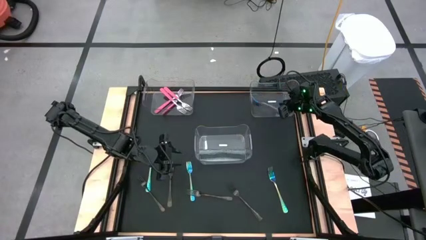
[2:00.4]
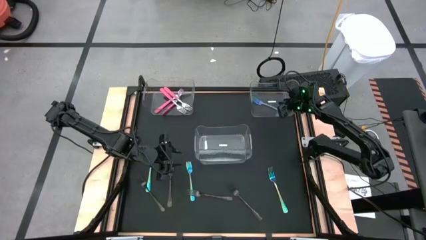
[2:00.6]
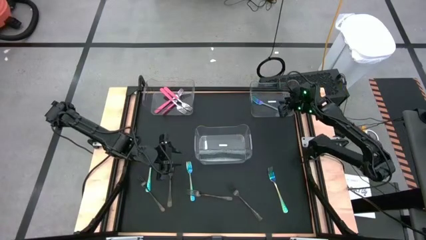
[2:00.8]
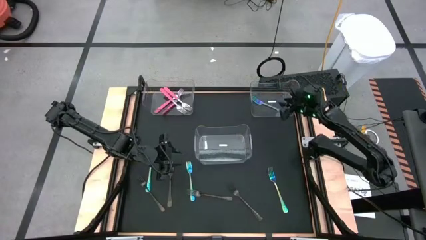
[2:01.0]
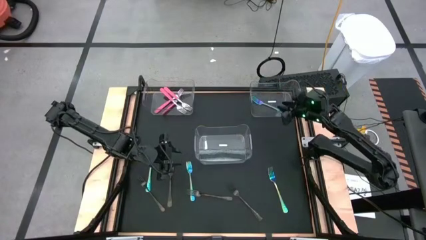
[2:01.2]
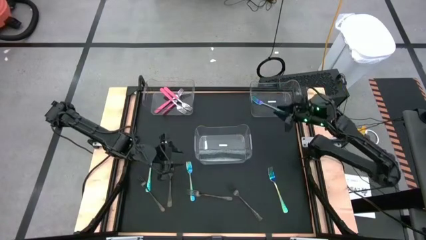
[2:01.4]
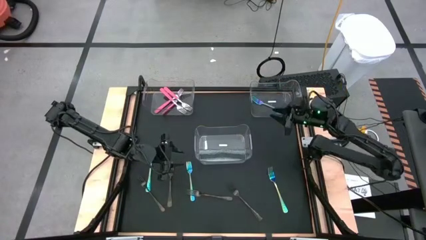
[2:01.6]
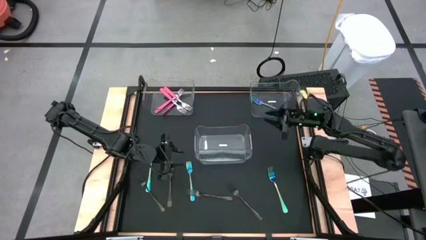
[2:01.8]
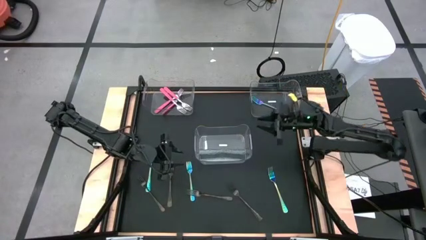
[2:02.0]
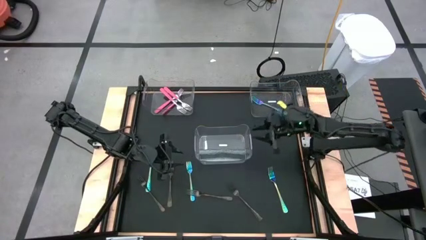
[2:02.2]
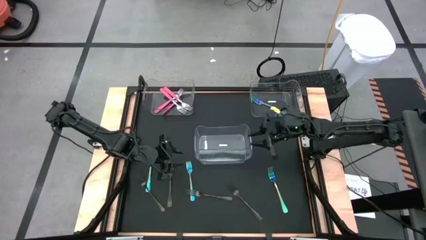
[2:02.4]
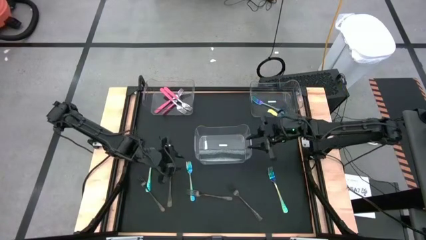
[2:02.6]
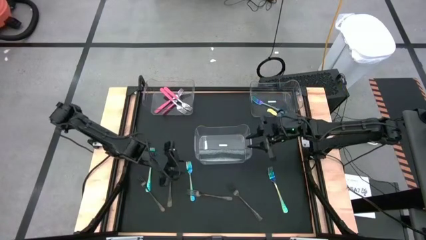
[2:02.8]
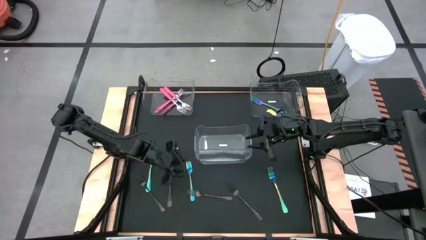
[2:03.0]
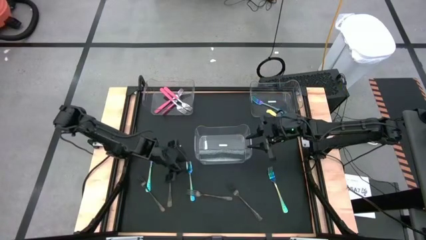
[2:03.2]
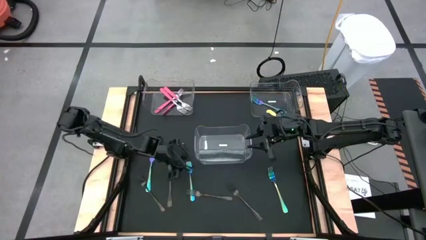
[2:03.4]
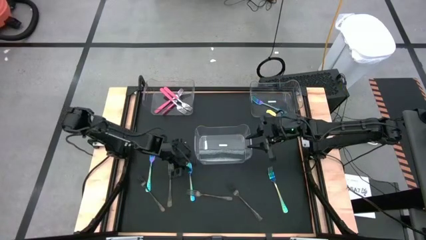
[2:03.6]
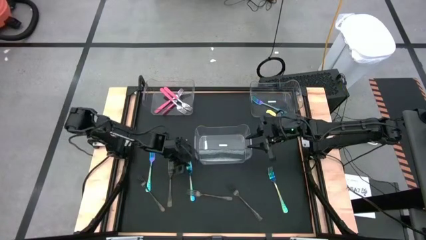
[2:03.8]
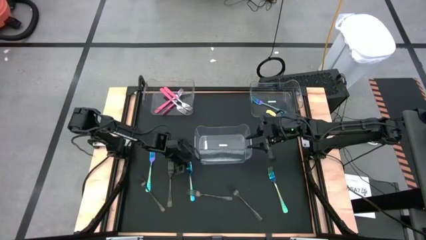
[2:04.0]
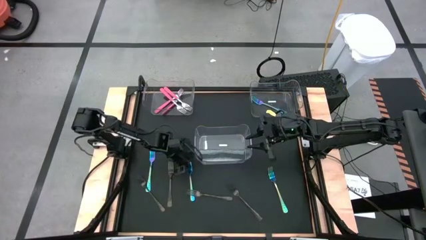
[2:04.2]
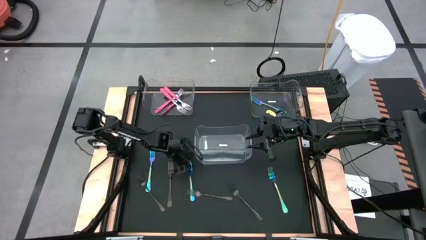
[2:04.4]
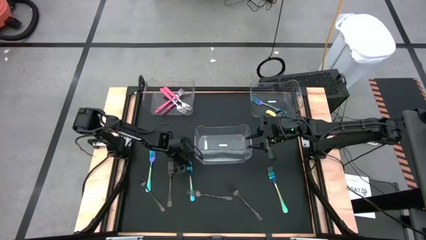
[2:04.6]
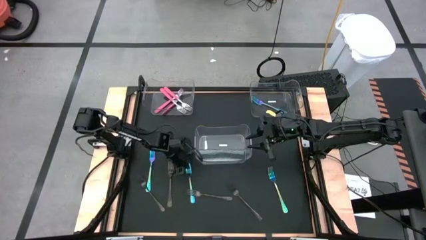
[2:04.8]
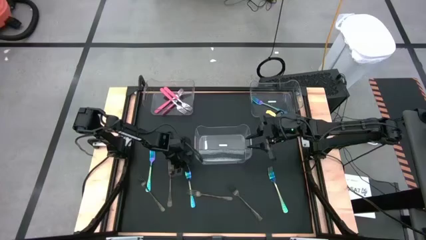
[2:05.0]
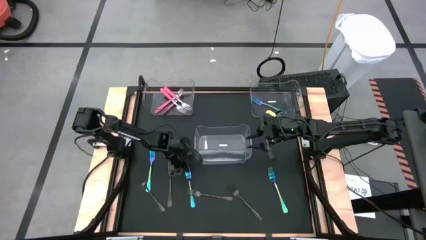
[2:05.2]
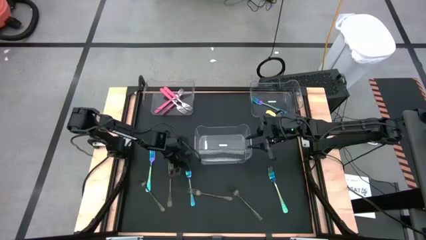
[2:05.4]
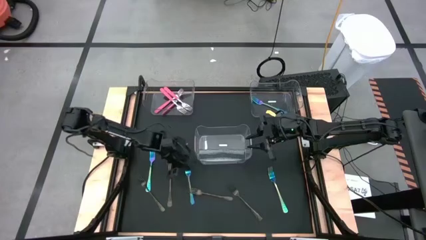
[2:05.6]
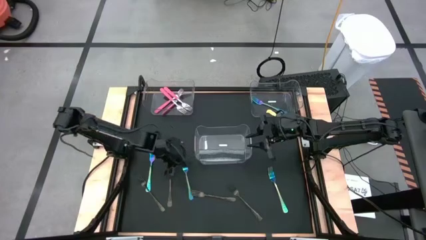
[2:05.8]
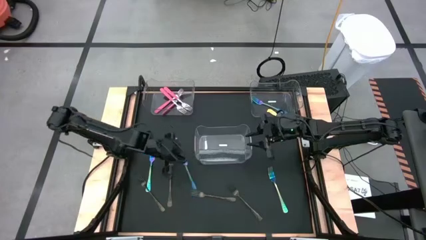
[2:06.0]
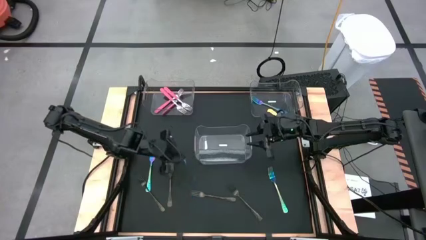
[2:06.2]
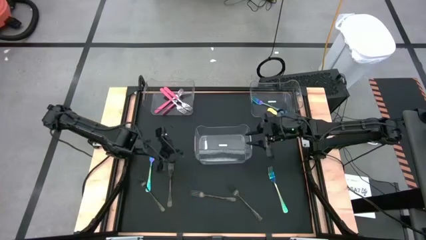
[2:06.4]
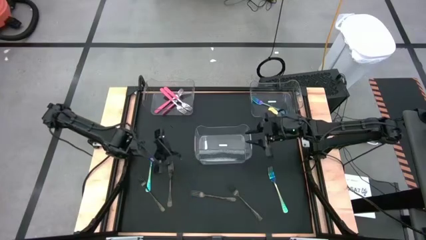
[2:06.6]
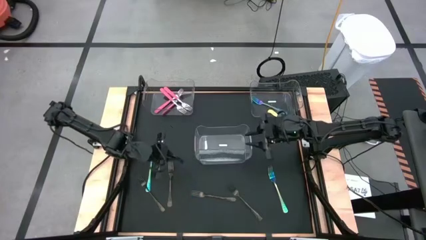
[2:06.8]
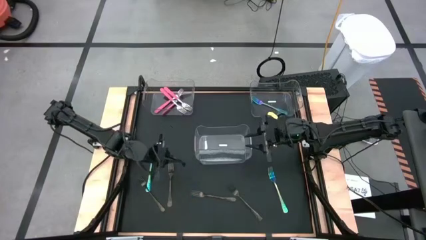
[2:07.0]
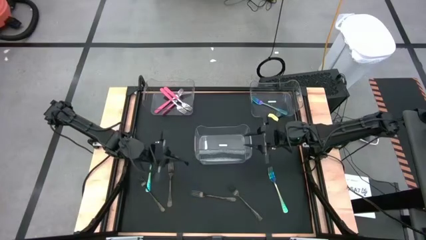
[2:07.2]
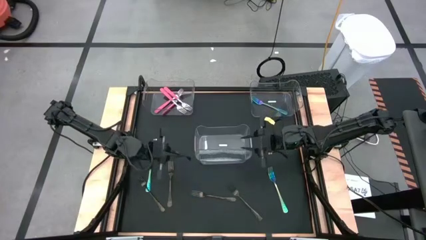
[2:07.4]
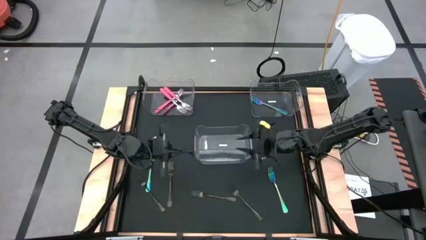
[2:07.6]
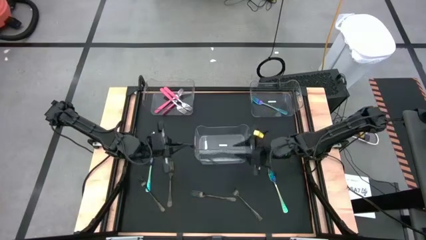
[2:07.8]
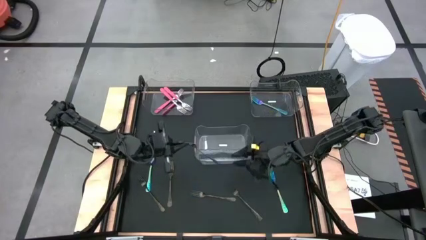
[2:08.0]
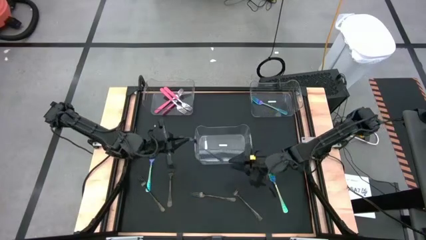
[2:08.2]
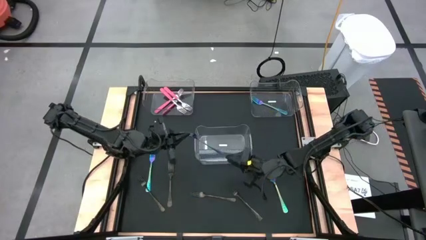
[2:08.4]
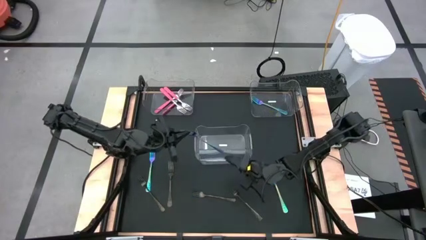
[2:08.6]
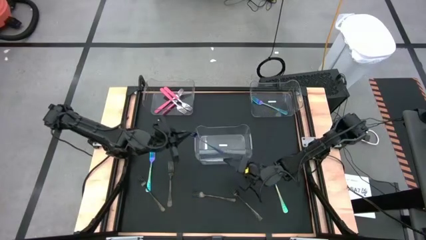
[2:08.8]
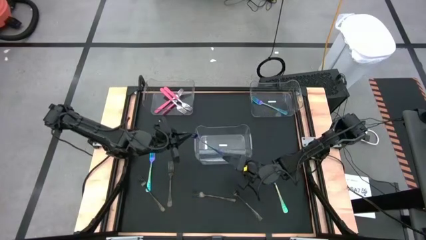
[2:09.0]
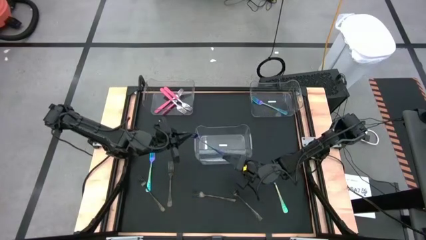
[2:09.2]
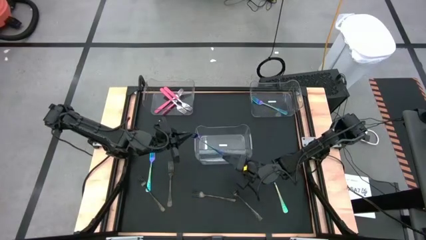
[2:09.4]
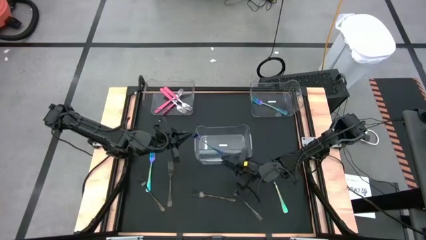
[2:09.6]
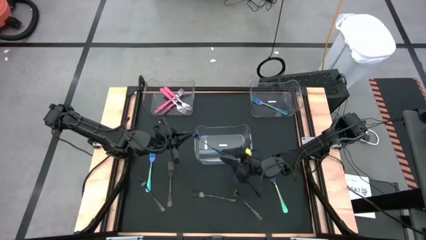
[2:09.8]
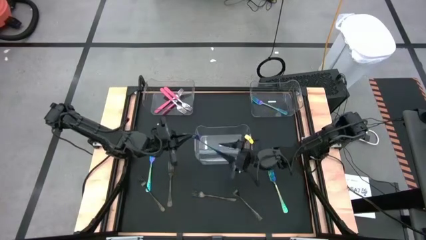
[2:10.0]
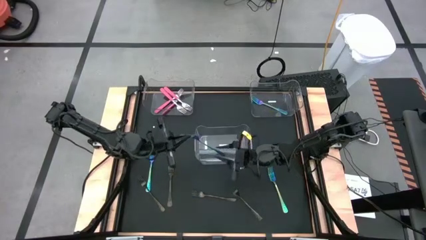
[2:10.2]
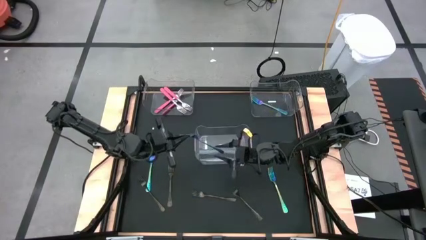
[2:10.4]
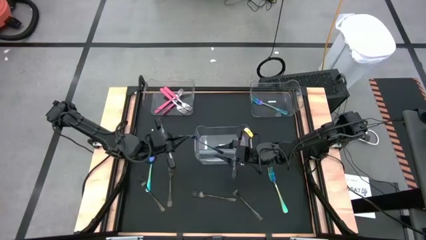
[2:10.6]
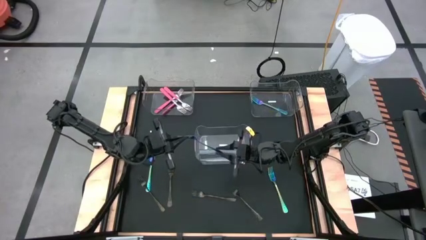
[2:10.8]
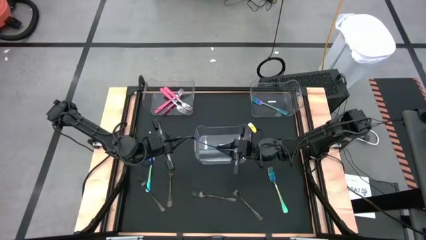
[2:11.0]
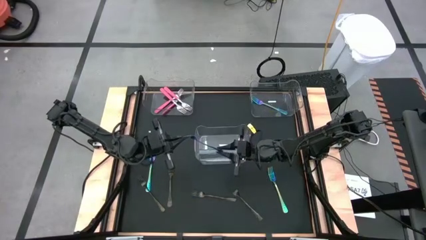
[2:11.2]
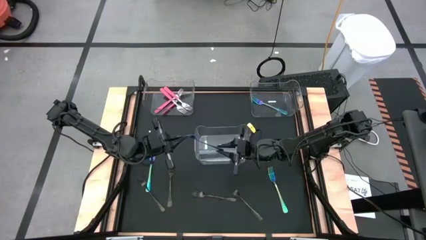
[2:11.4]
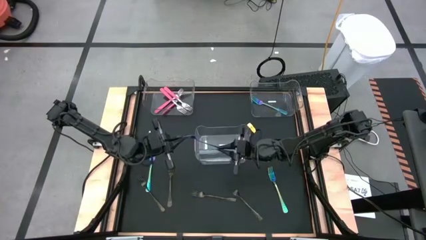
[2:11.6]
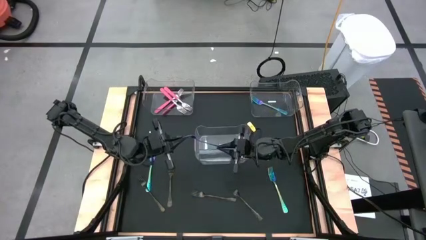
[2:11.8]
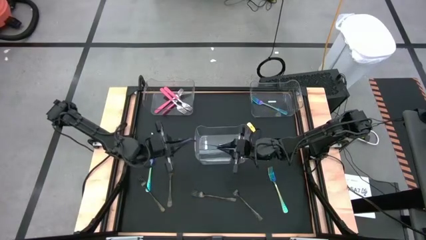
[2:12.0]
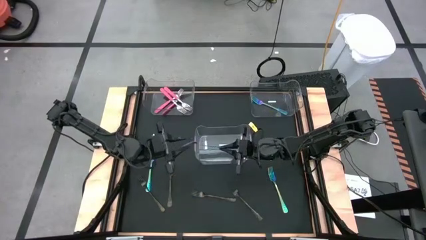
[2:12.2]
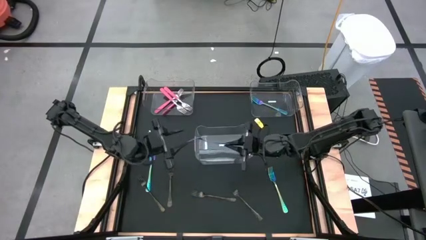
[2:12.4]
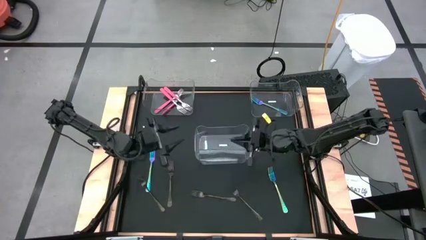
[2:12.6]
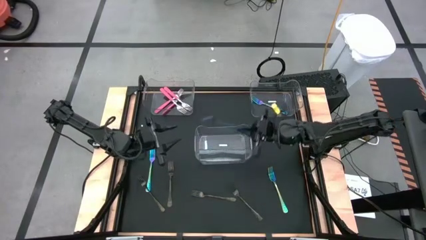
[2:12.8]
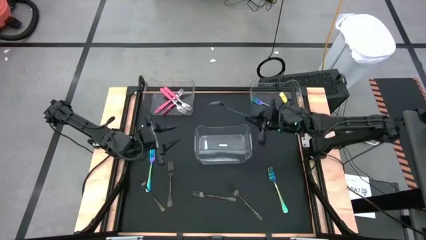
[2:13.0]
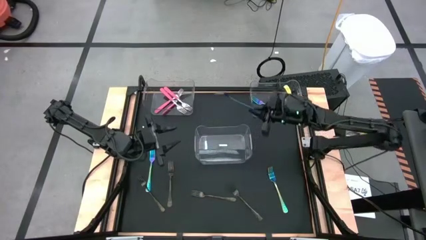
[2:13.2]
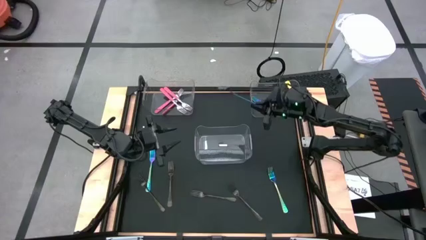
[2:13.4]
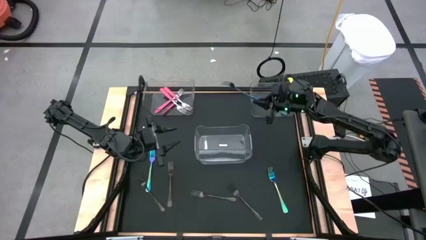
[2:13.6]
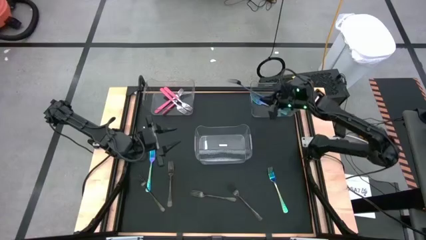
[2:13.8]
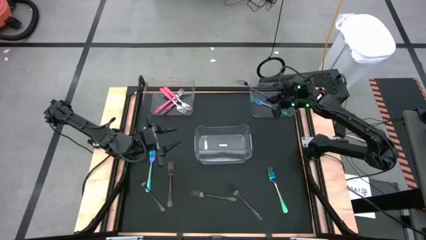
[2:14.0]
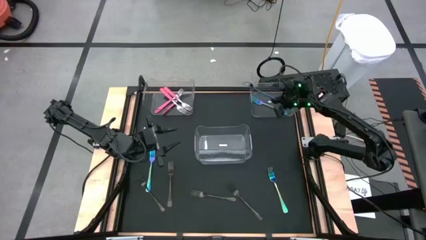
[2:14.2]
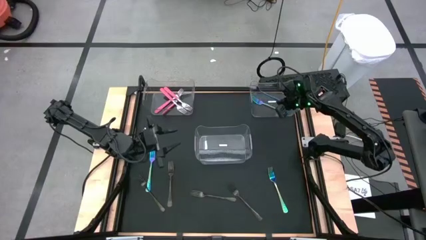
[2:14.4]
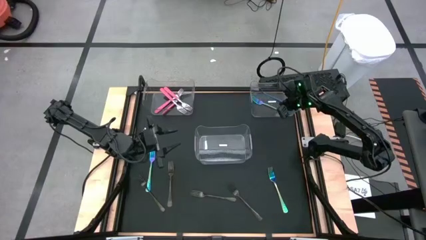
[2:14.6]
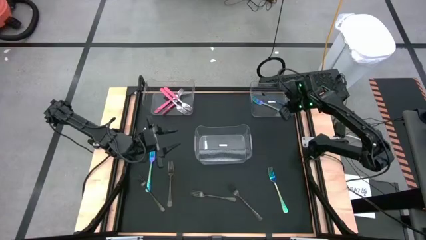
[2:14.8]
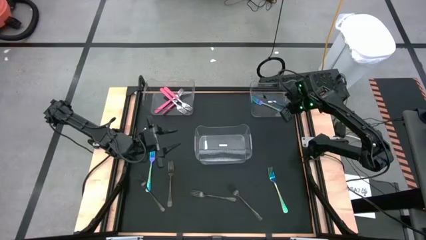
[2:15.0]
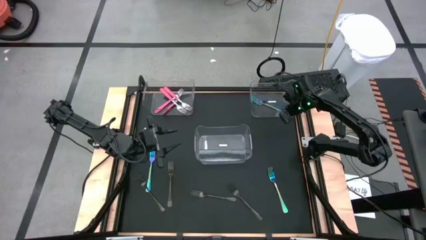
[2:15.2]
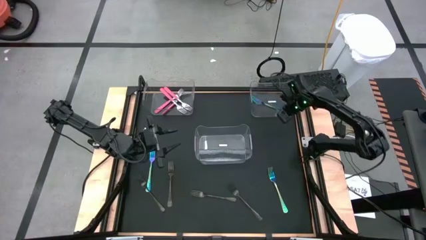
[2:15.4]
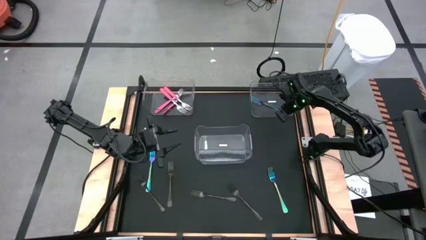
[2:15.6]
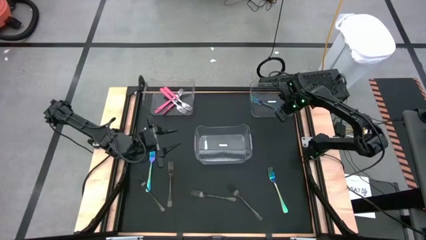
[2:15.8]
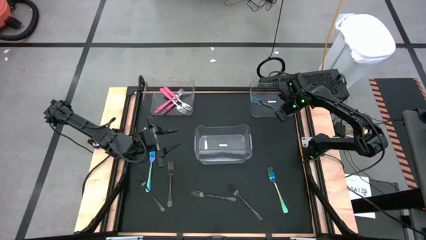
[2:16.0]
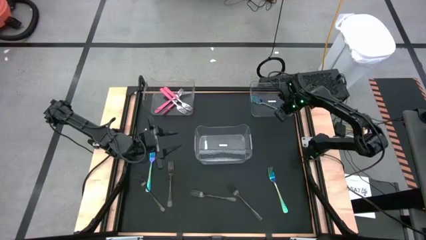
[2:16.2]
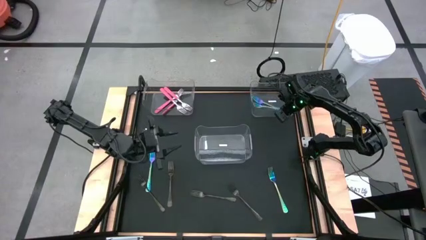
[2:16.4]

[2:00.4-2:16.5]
Task: Sort silverware by color (type)
Put the blue fork into the right transparent bin

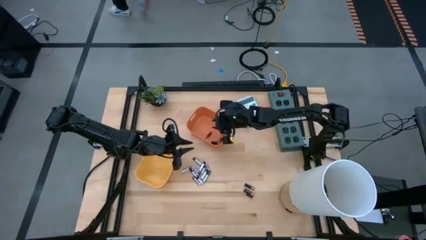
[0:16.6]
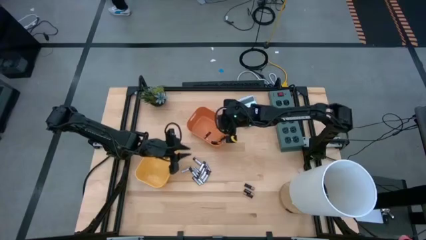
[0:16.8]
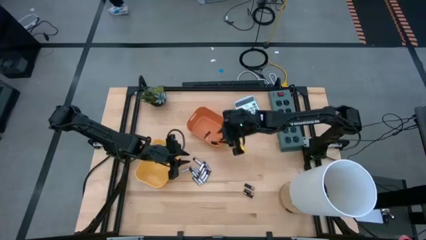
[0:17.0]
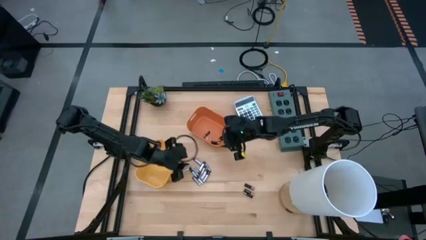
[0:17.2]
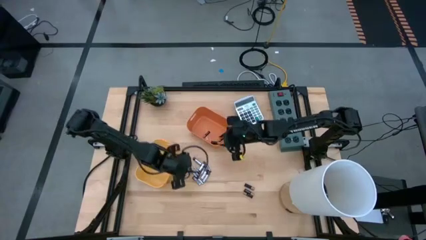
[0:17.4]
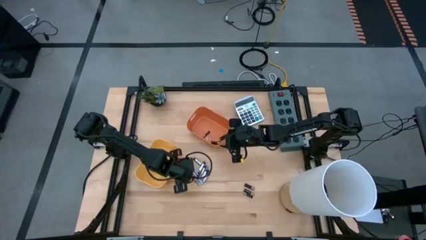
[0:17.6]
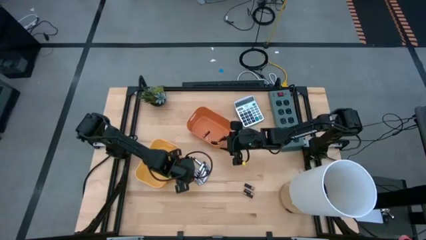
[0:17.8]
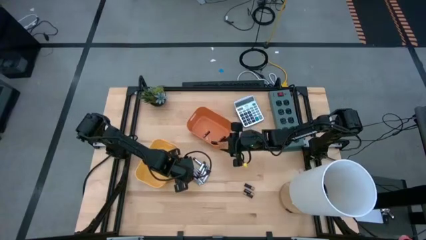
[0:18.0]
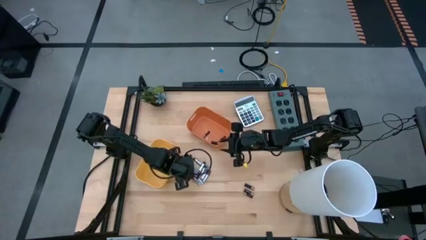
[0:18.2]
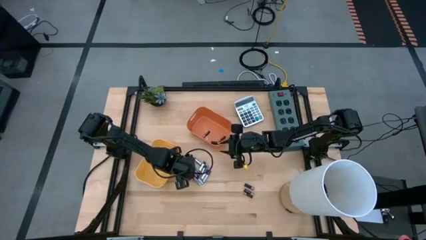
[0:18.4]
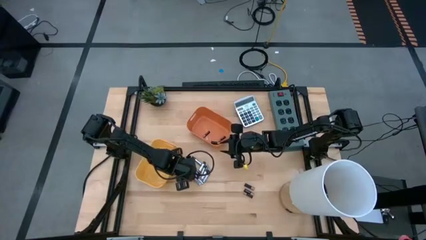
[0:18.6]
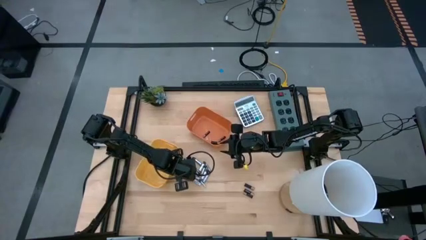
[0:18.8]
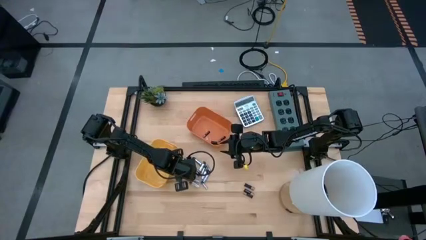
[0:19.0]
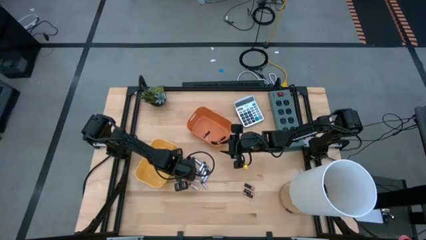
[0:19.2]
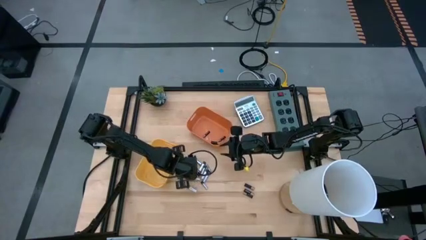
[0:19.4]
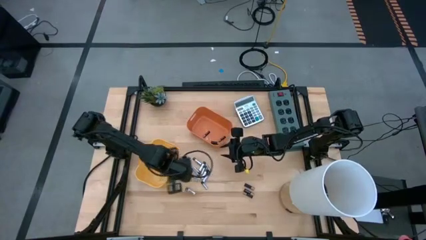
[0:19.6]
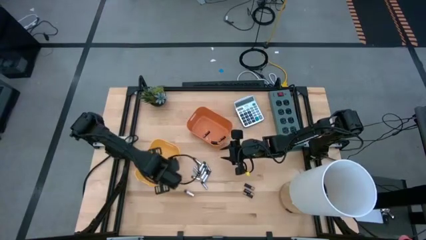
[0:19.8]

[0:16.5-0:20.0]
Task: Sort batteries
Put the silver battery into the yellow bin
